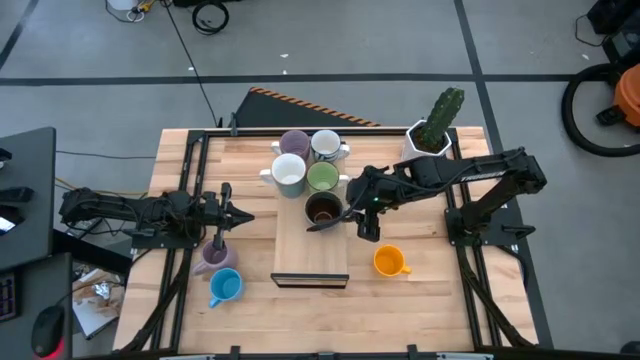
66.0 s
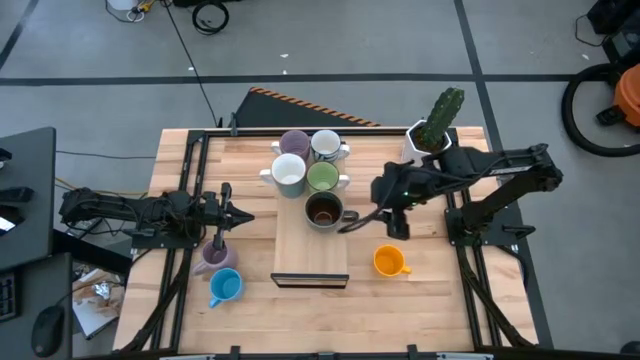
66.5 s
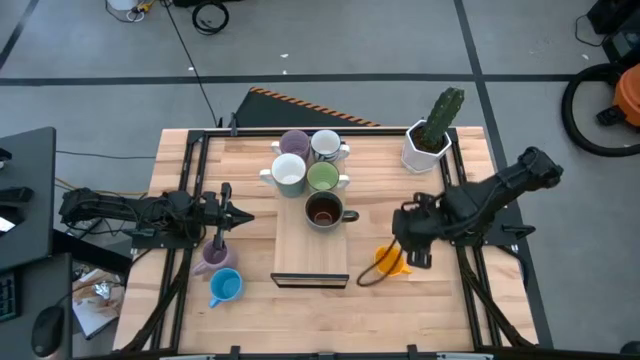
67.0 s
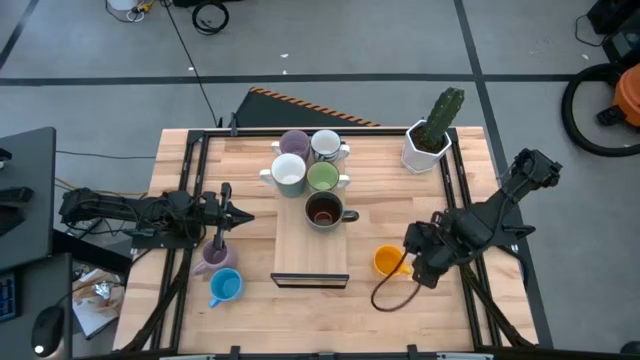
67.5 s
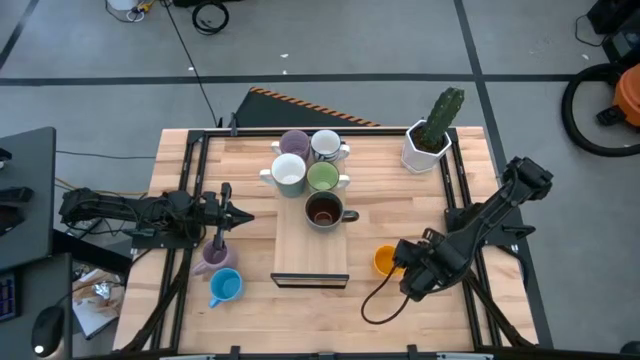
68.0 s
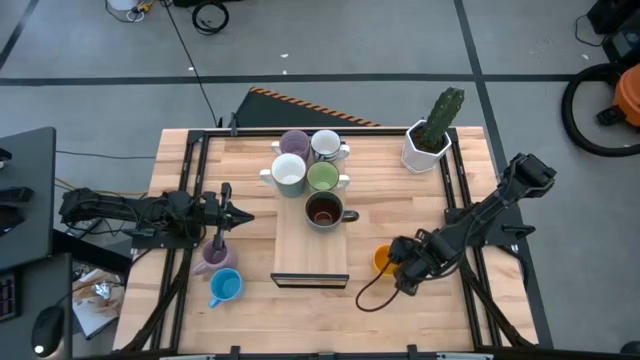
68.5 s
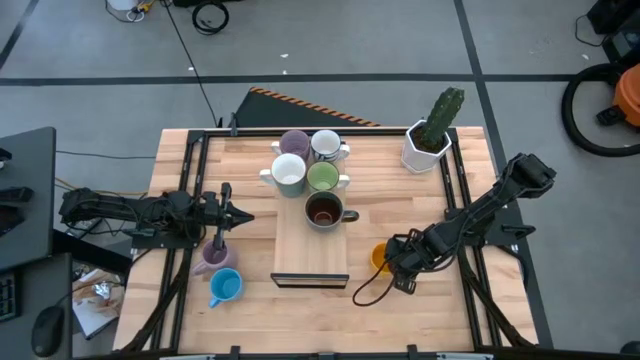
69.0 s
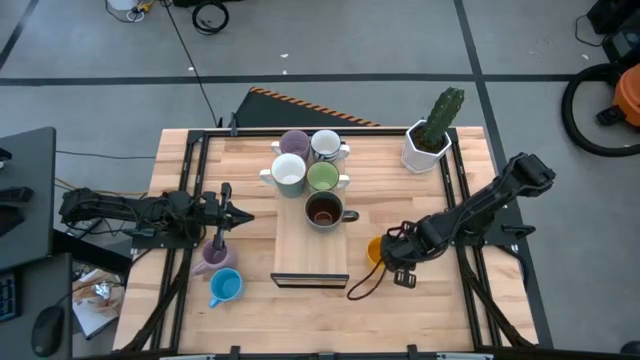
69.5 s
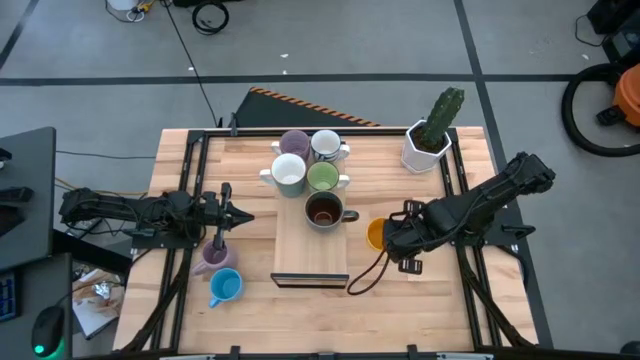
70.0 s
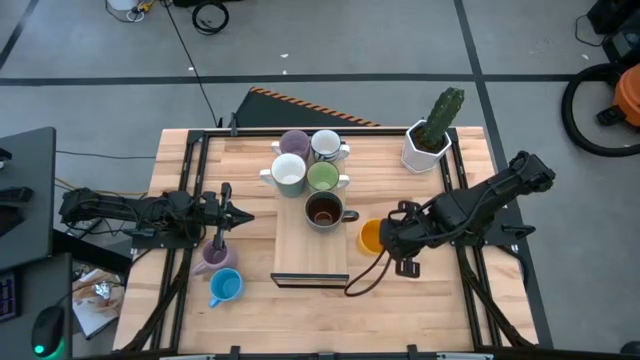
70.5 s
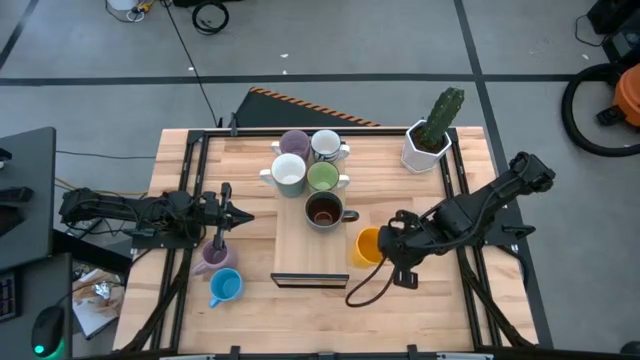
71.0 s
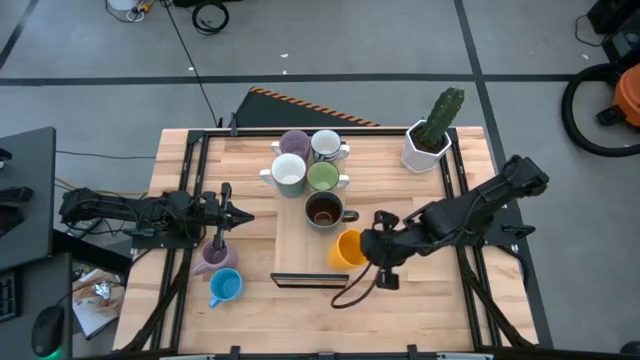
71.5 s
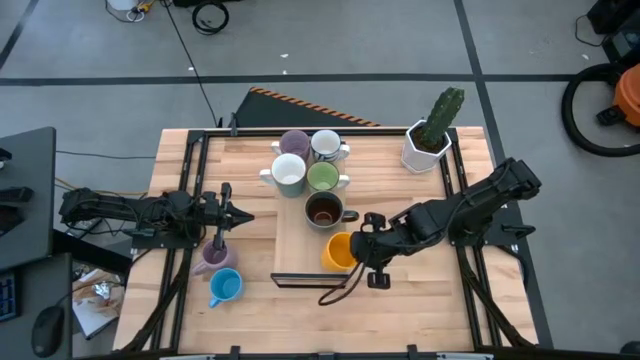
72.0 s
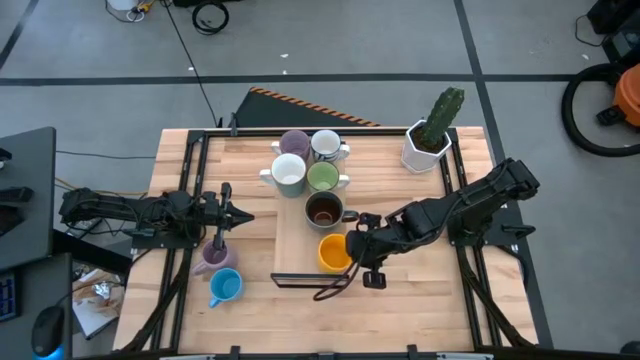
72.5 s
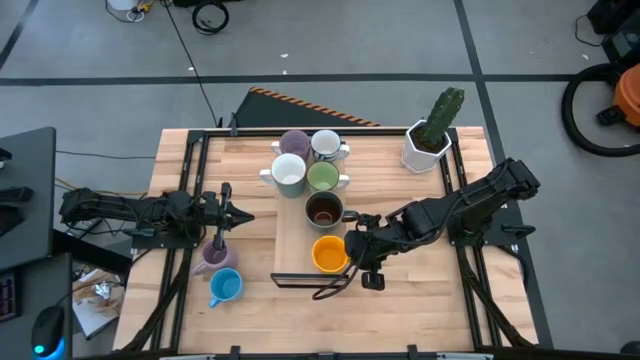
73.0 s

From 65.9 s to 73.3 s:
Task: Place coffee mugs
Put the yellow mug on the shelf beside the dark green mug

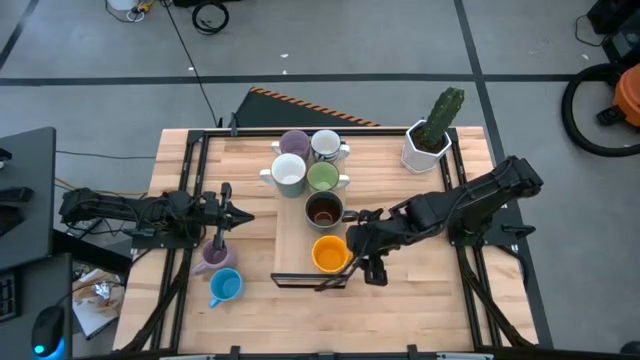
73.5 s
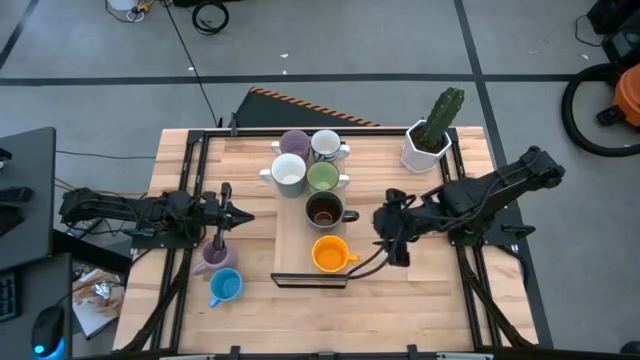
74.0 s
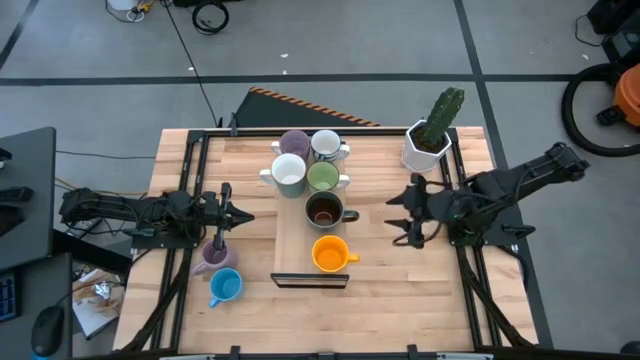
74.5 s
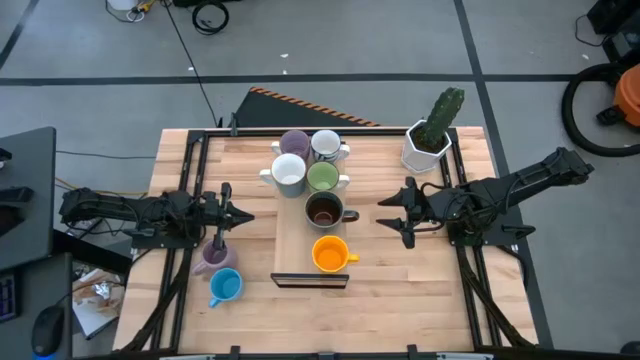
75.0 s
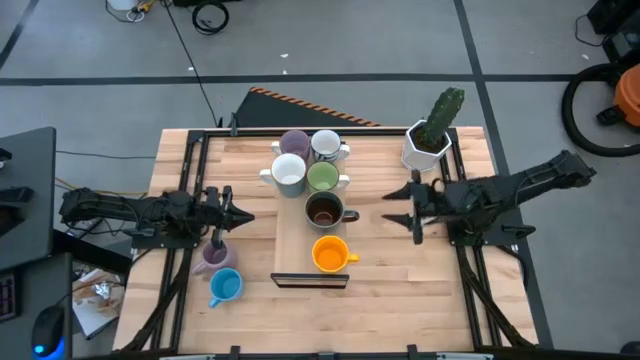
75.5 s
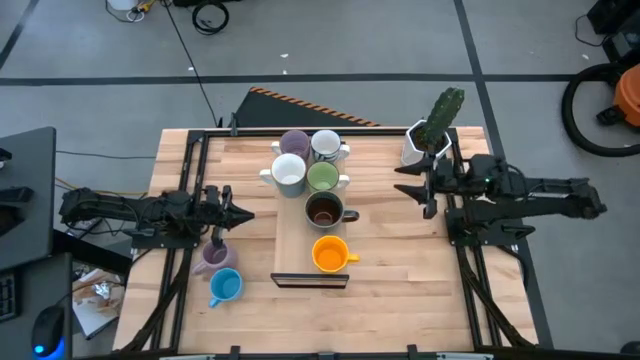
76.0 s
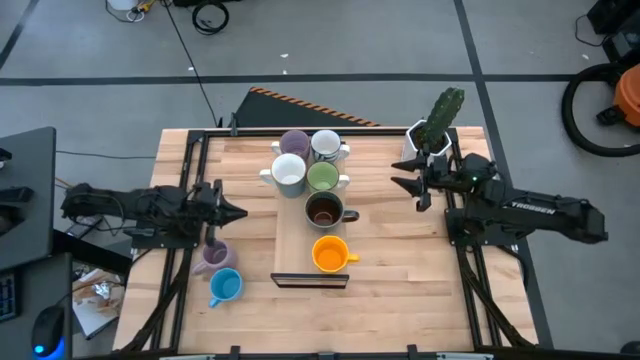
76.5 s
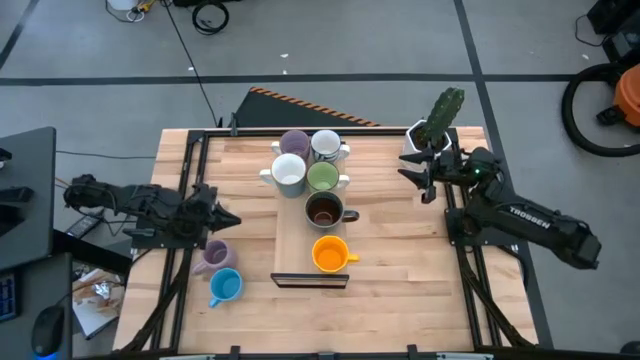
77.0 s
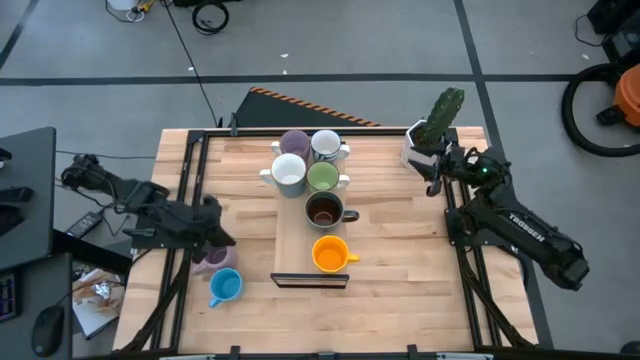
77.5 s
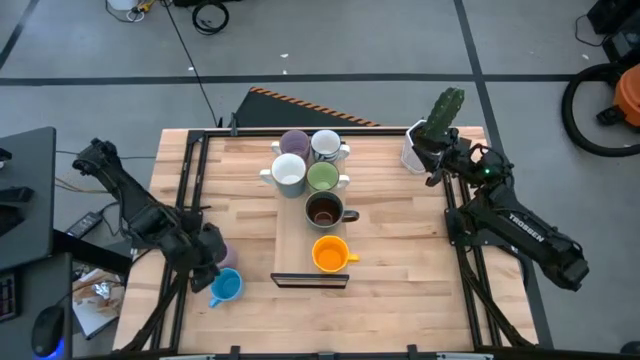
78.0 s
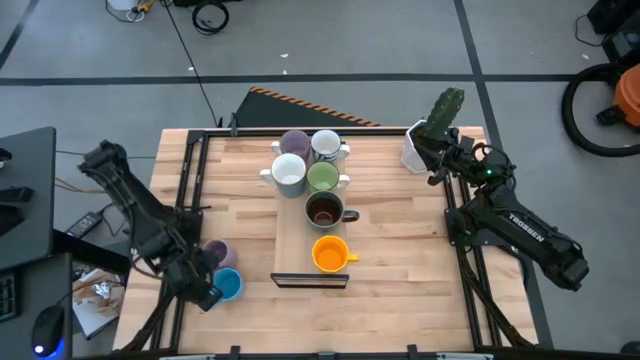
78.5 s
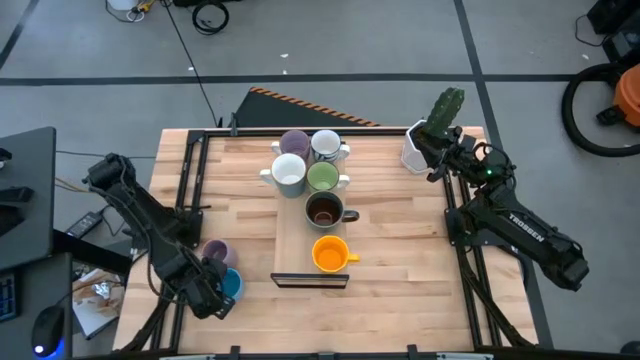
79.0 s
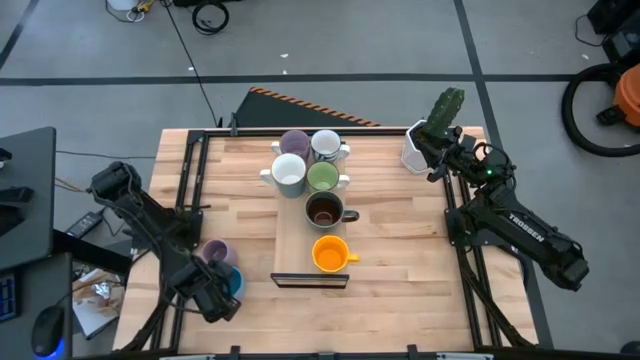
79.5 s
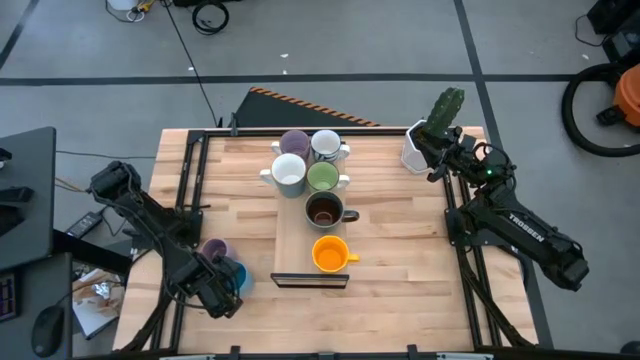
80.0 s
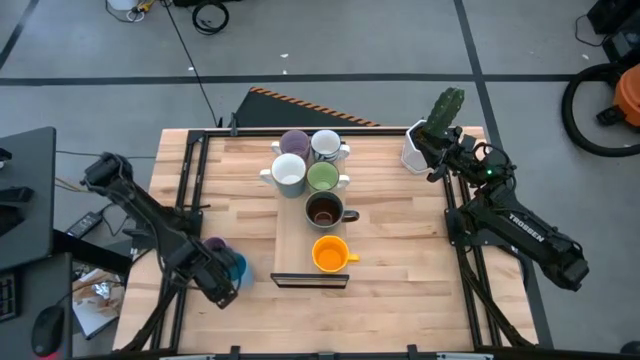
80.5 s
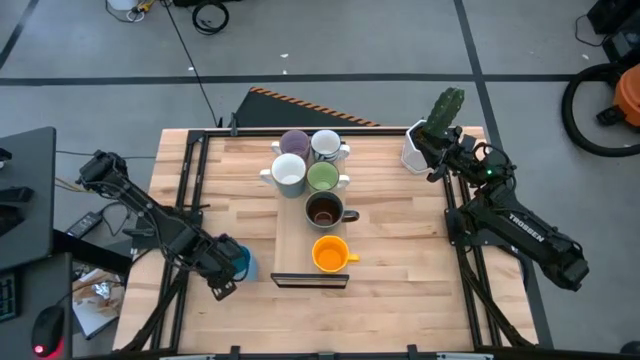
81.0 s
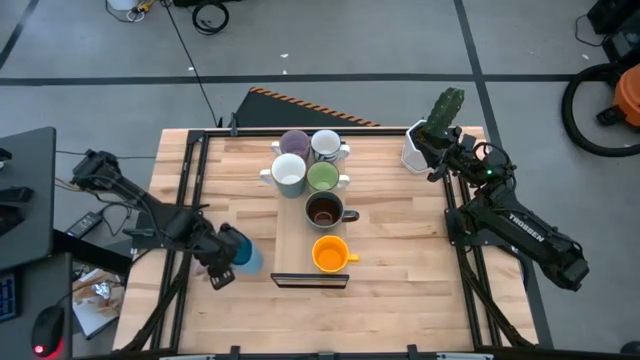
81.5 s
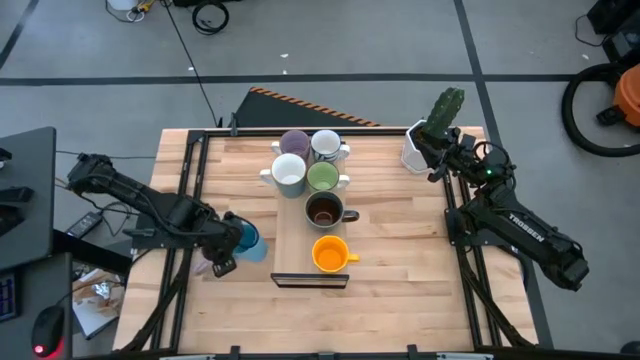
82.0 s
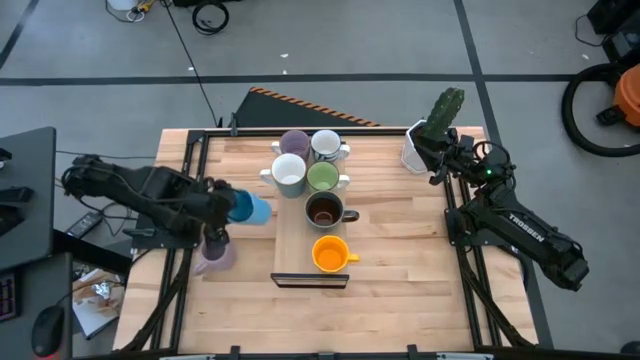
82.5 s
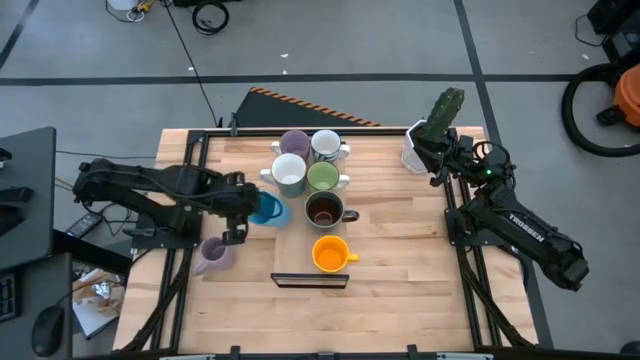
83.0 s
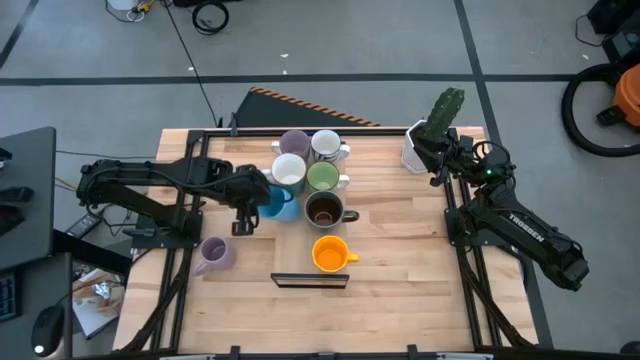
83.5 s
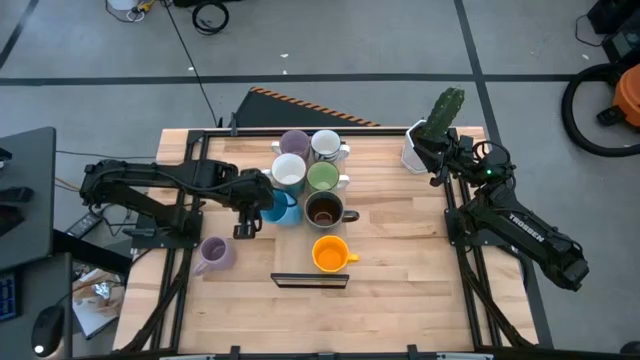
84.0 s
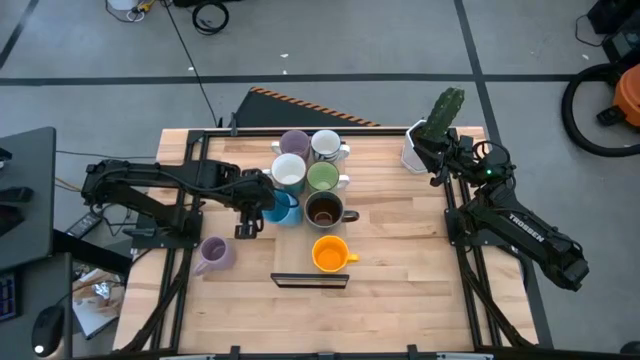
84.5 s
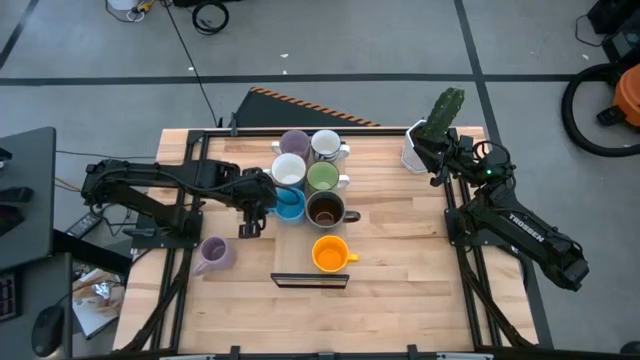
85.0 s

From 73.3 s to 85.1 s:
Put the blue mug on the shelf

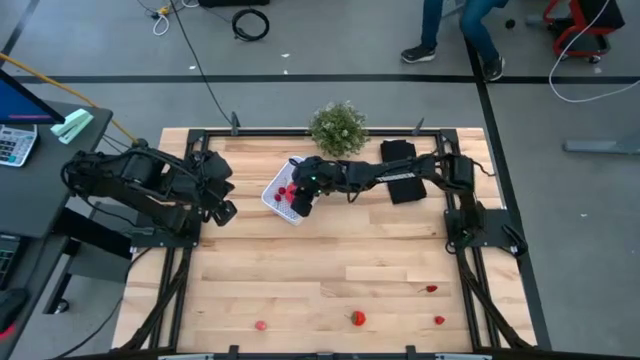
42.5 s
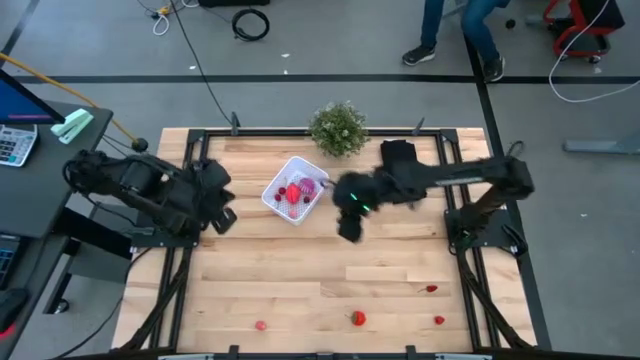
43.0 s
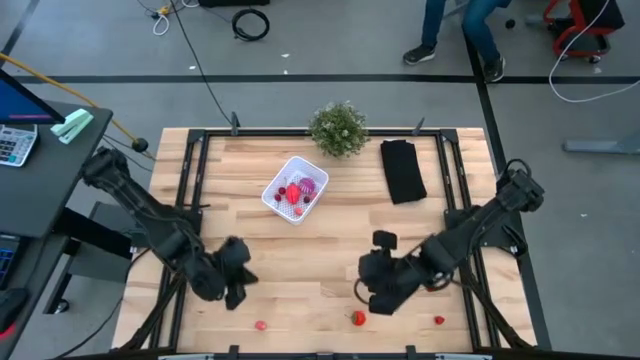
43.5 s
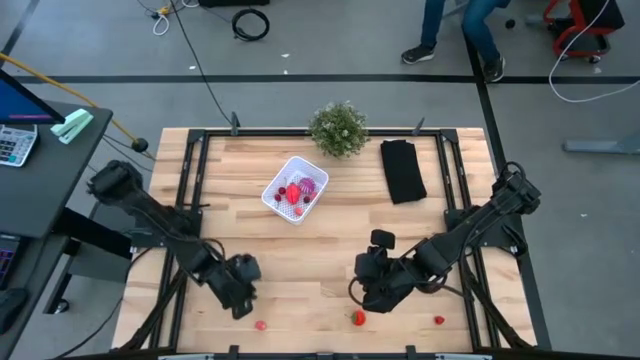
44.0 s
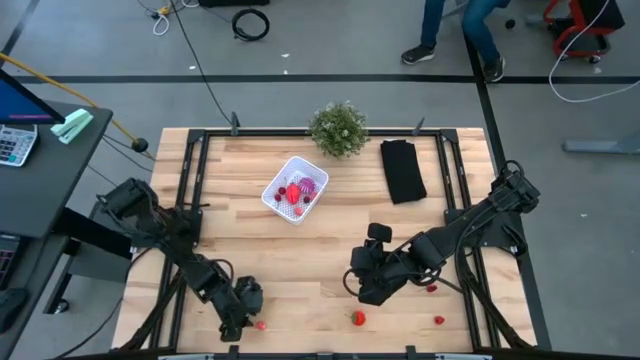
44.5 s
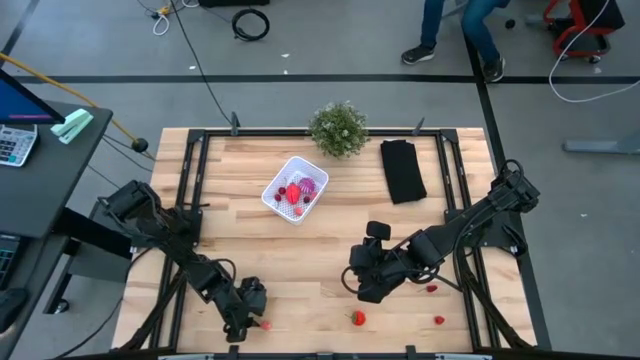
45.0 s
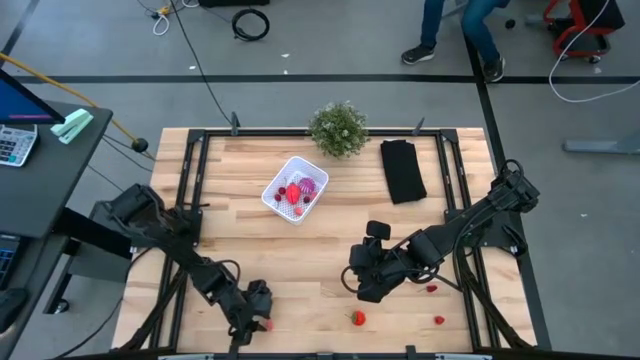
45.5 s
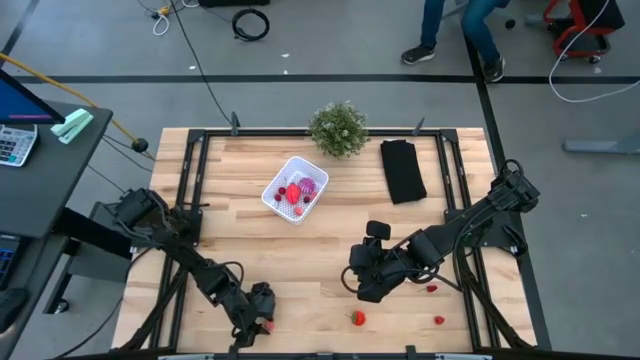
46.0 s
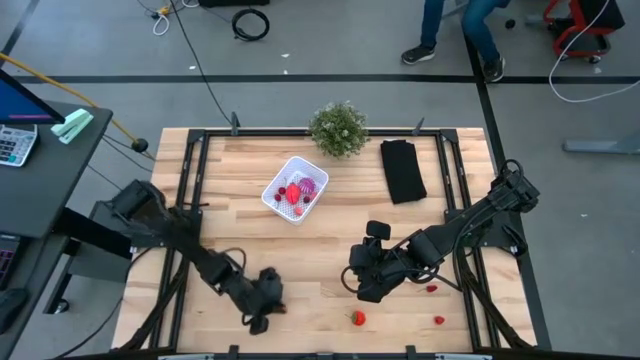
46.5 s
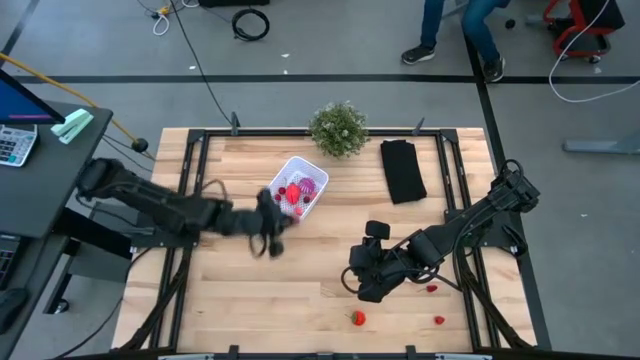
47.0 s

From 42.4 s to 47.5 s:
Task: Pick and placing Produce into tupperware
Put the pink peach into the white basket
